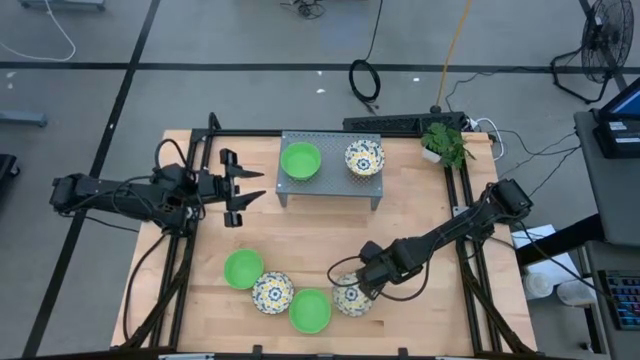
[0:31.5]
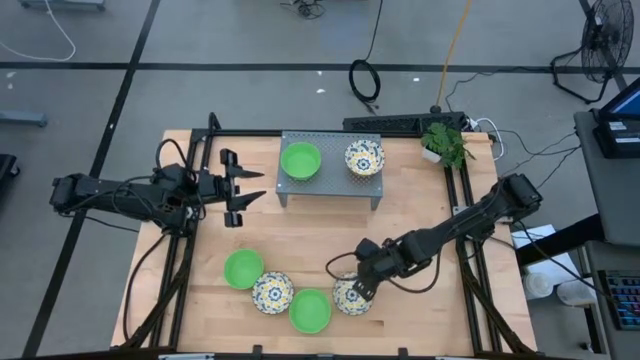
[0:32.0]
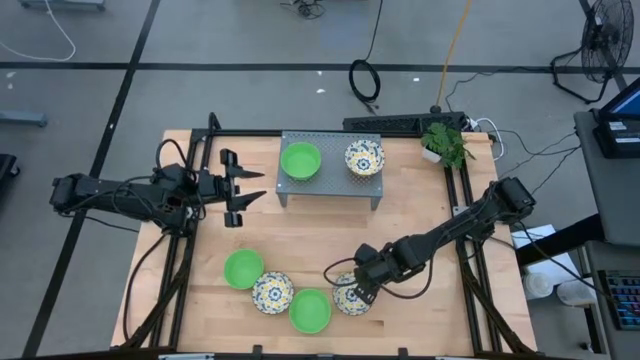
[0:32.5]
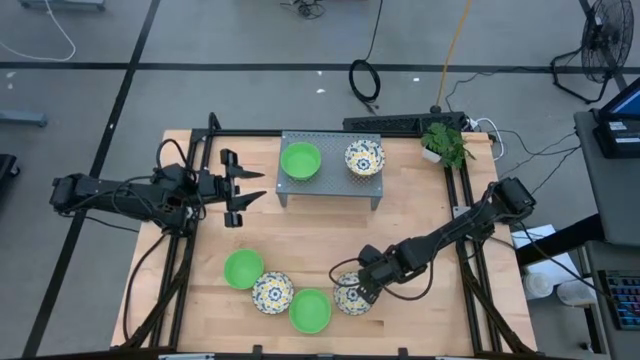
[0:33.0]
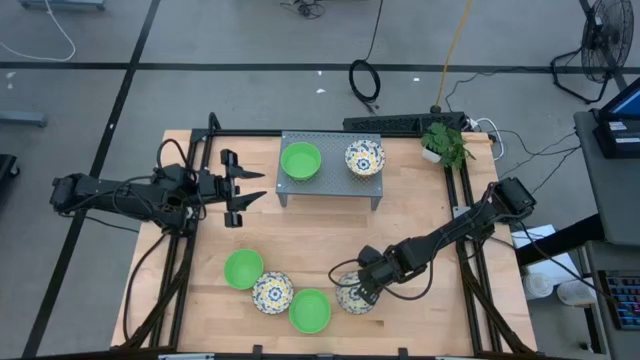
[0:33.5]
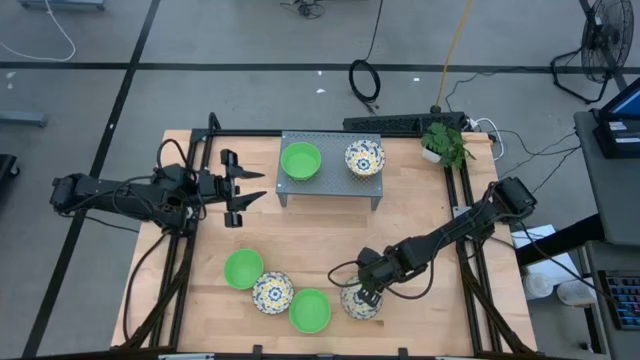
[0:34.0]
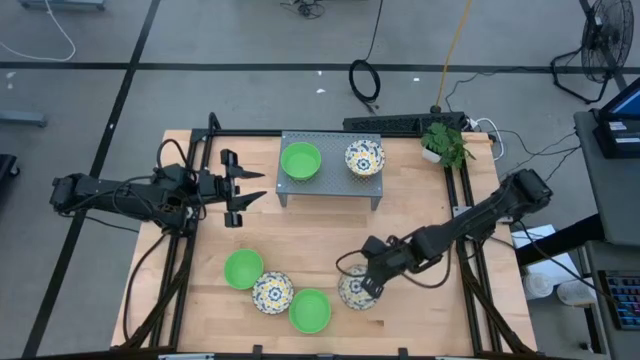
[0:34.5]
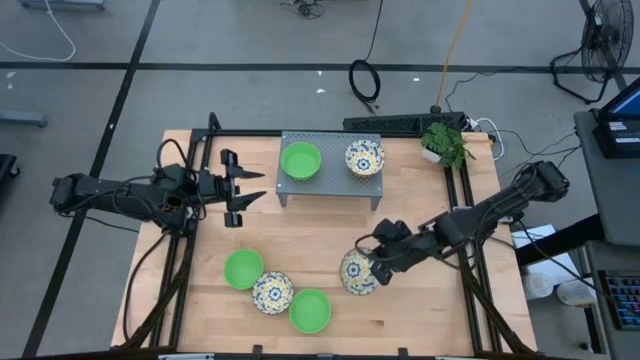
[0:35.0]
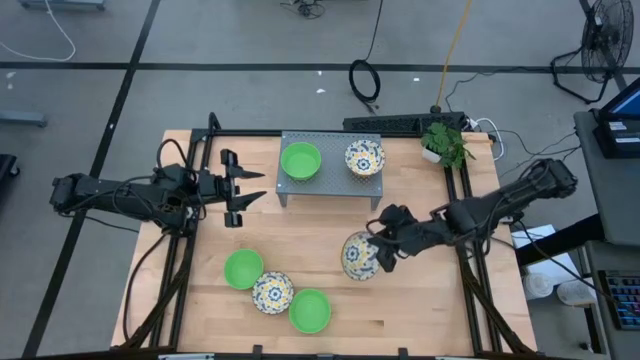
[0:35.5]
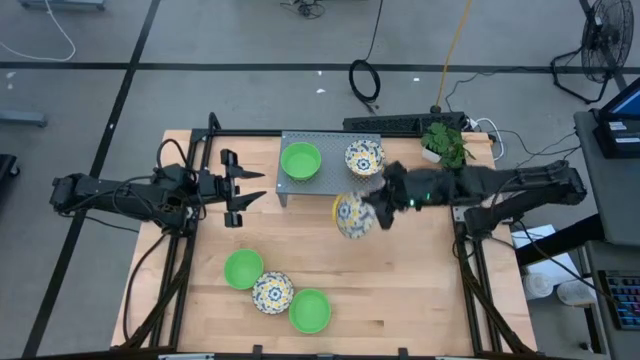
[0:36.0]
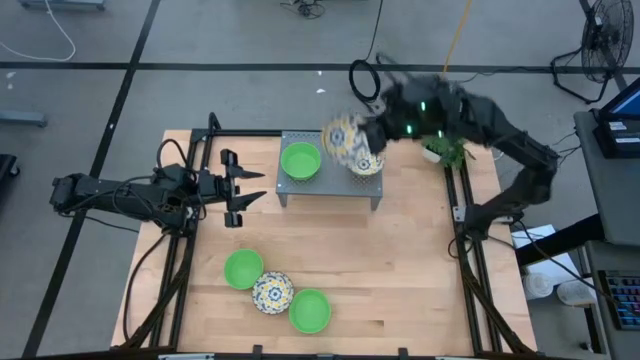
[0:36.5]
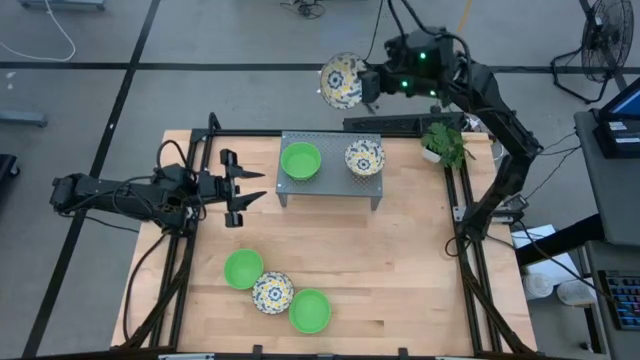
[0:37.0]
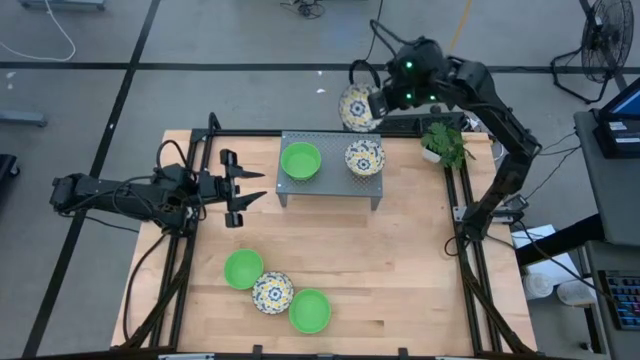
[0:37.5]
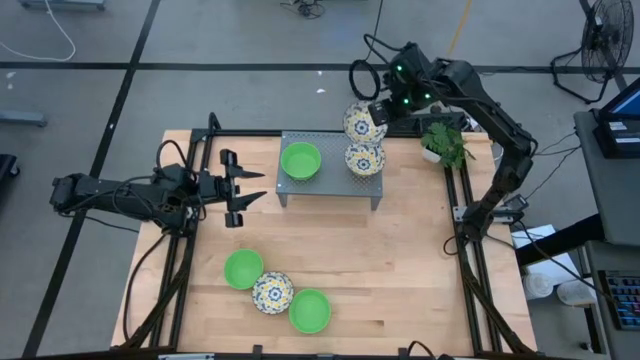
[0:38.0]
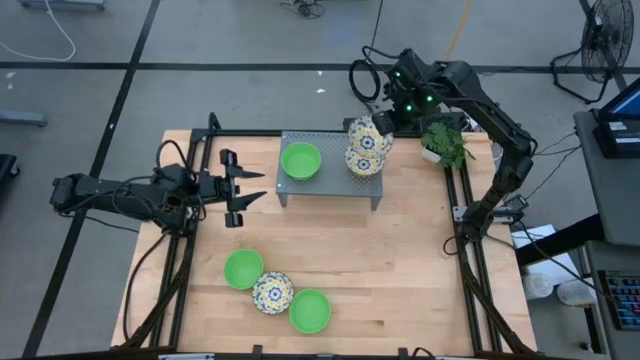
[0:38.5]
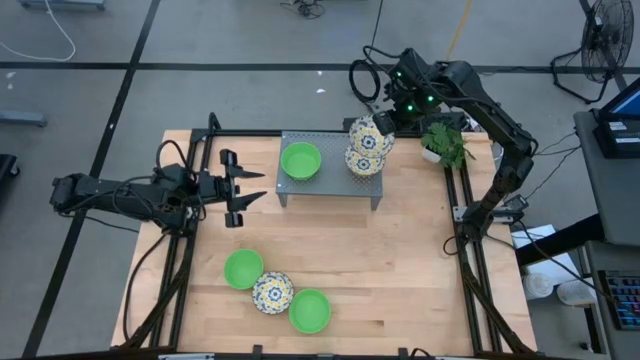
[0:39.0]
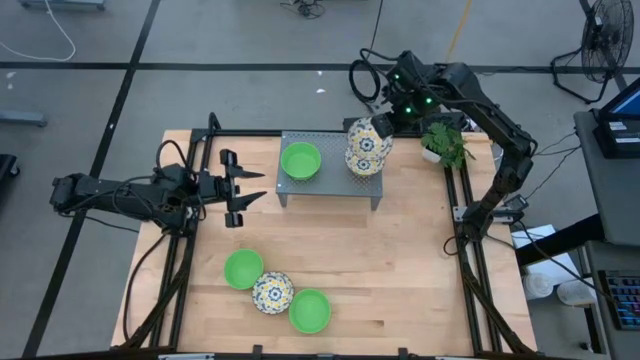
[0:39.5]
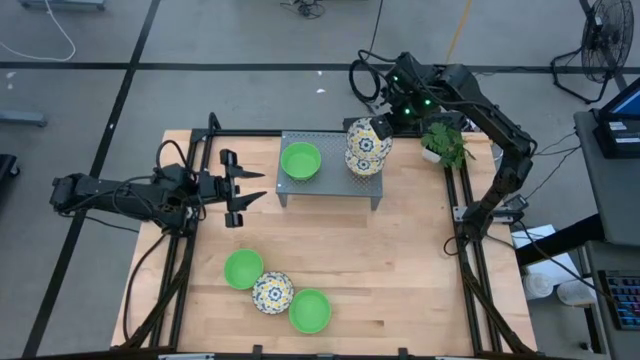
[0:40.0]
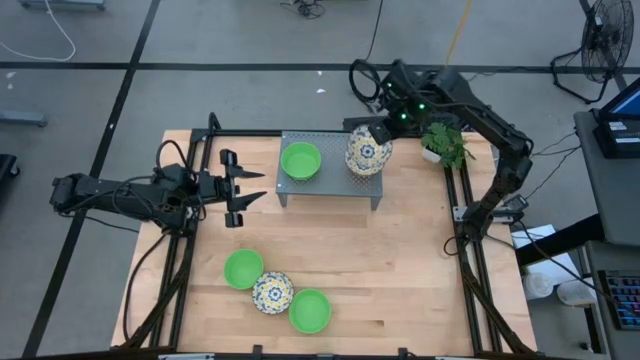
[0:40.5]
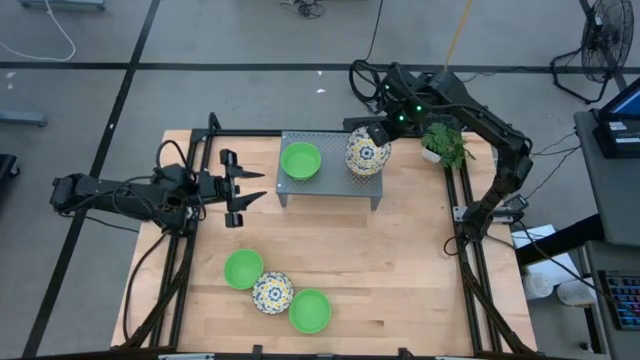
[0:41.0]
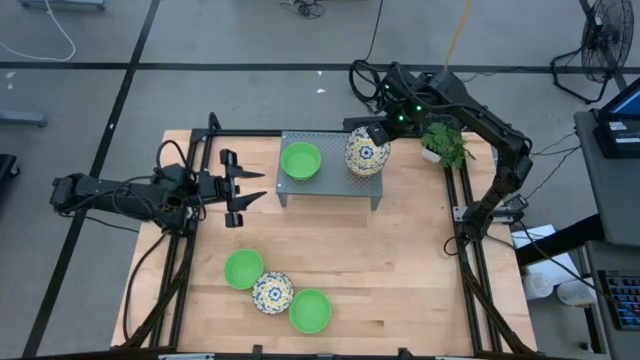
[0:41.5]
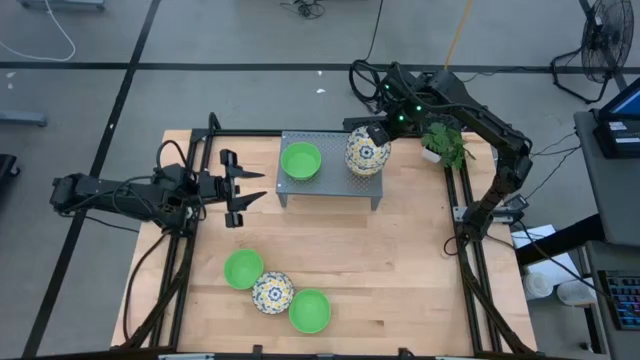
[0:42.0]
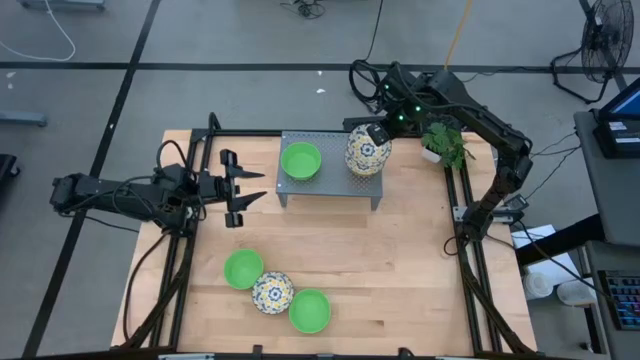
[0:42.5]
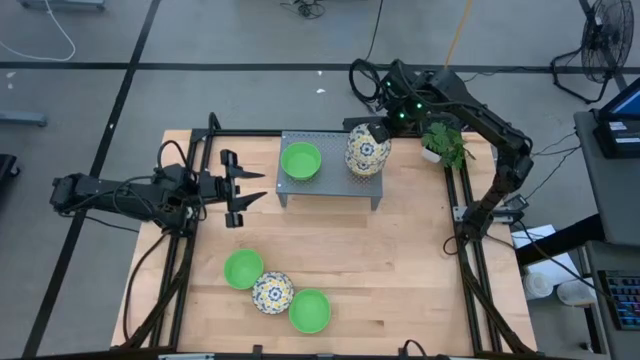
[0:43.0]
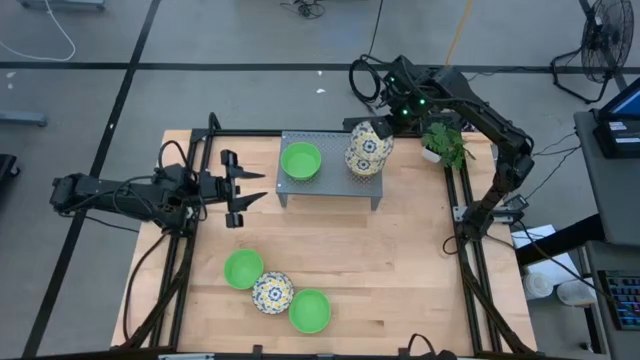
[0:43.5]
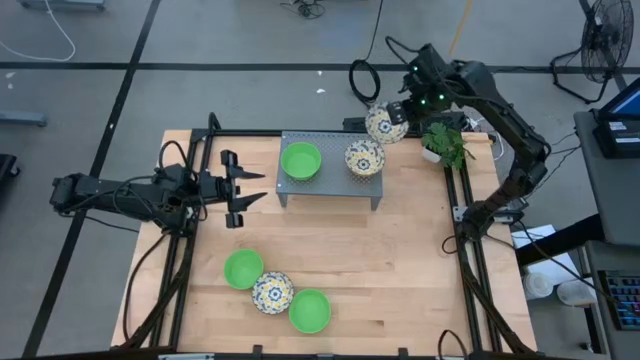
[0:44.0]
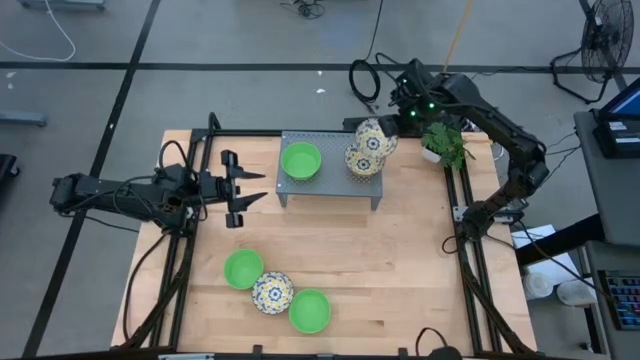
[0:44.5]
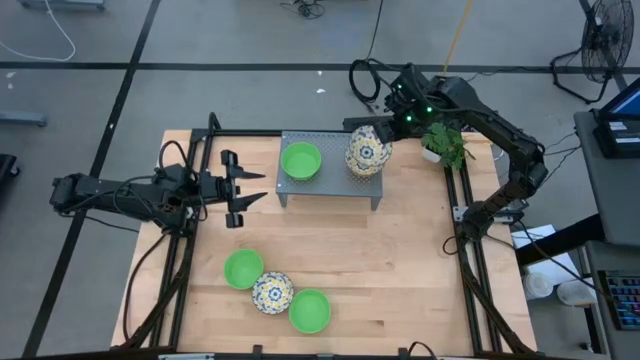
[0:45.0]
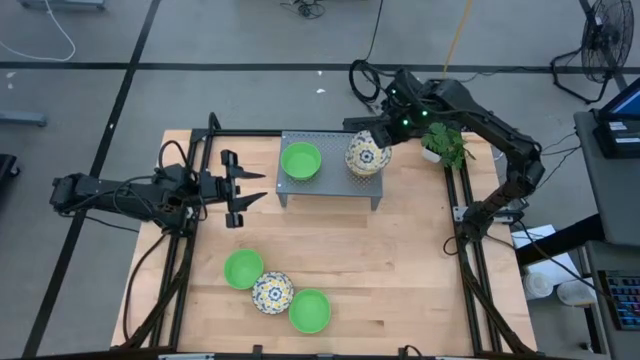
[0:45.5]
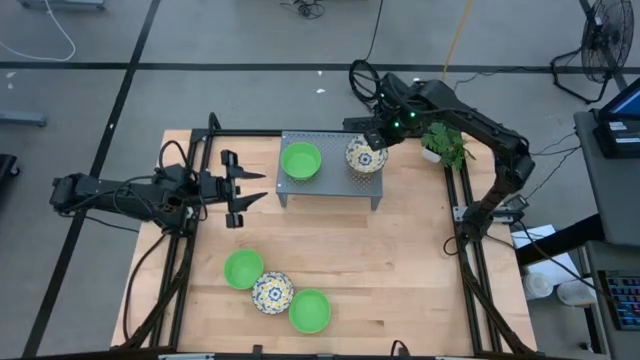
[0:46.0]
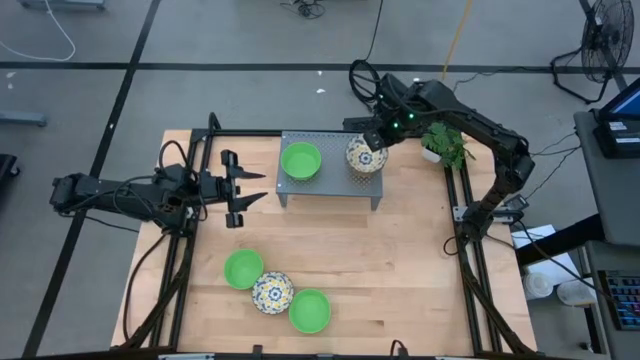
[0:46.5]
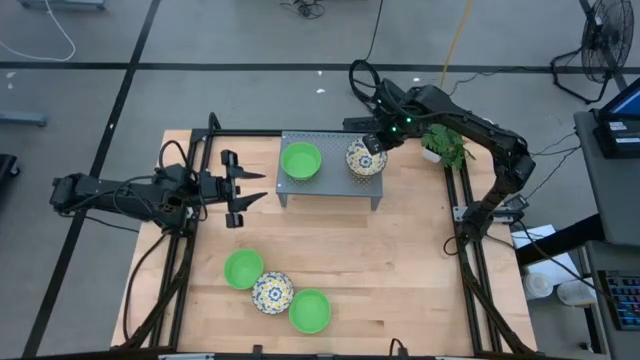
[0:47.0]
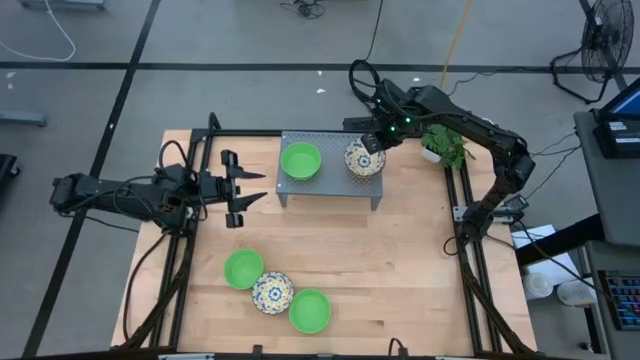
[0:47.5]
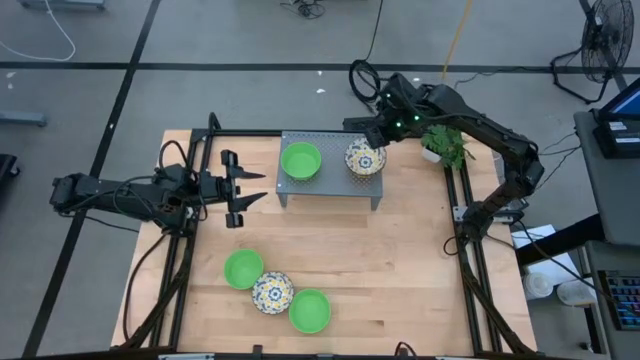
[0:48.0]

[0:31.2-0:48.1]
Task: Pick & Place Mini bowls
Stack the white patterned bowl on top of the white patterned bowl on the shelf

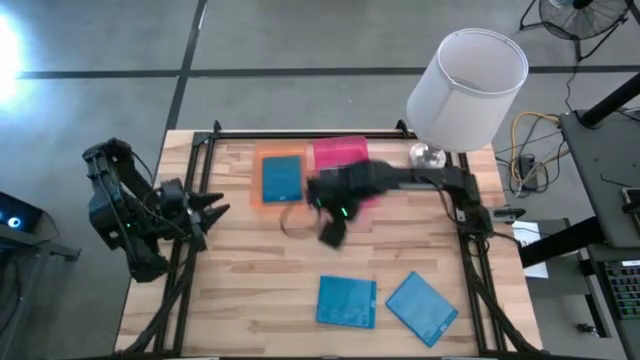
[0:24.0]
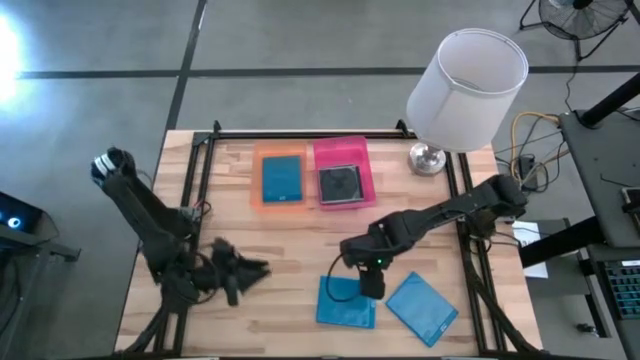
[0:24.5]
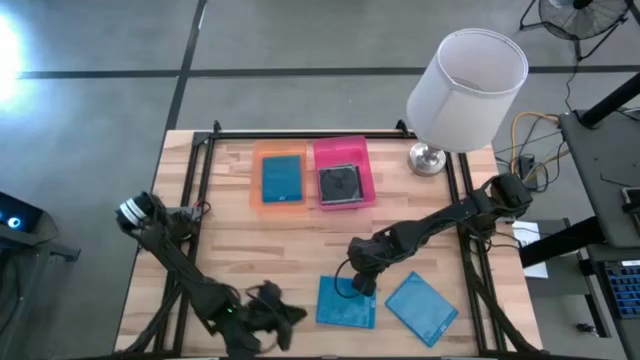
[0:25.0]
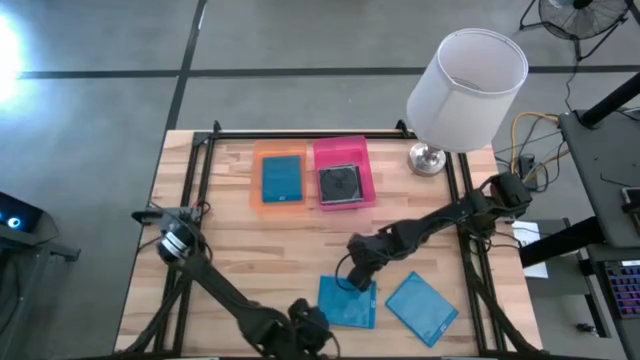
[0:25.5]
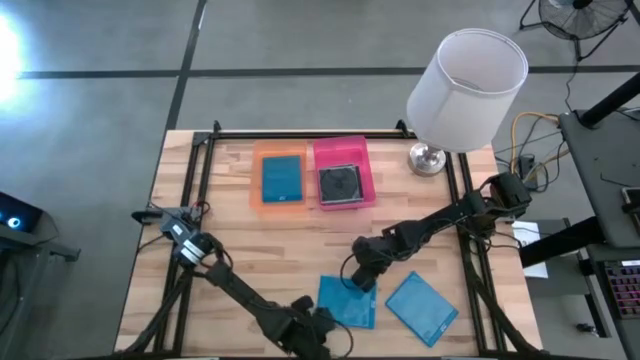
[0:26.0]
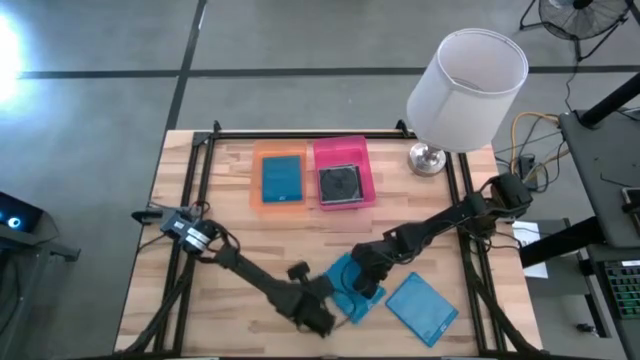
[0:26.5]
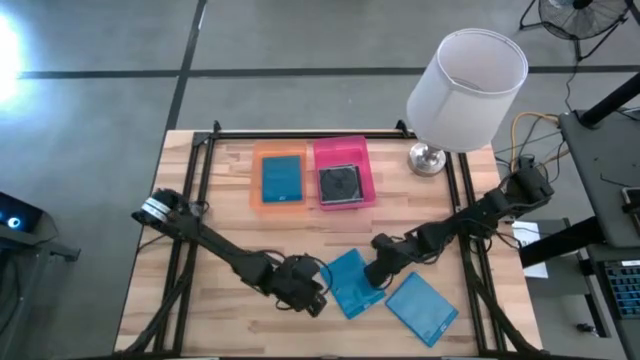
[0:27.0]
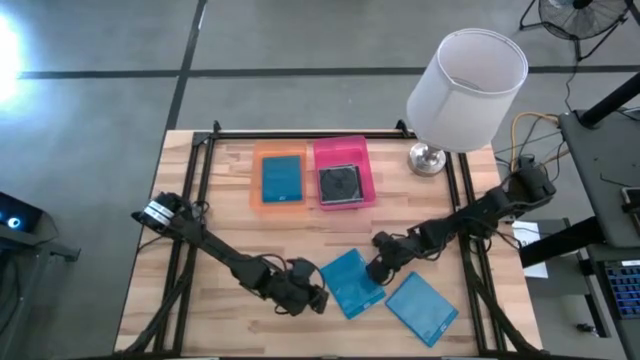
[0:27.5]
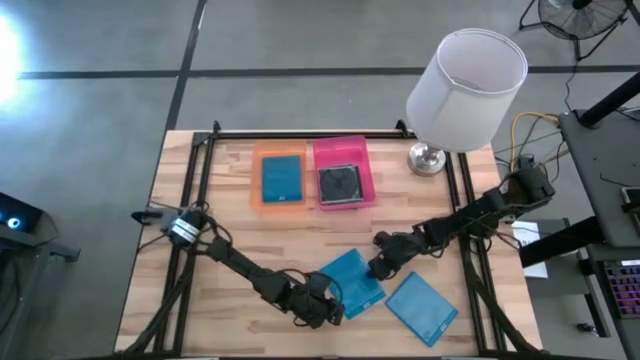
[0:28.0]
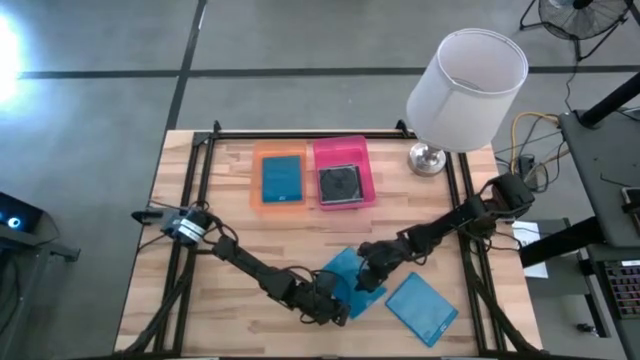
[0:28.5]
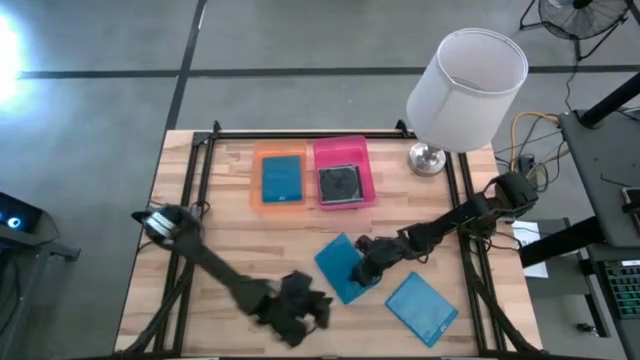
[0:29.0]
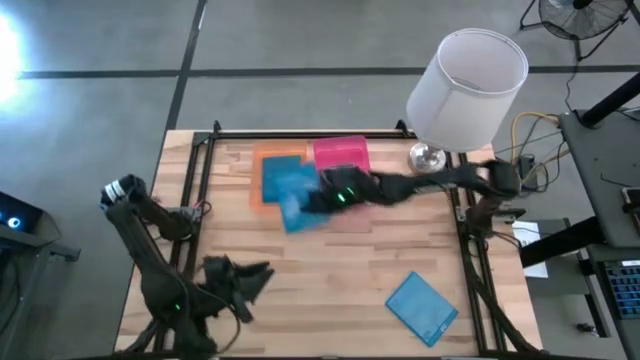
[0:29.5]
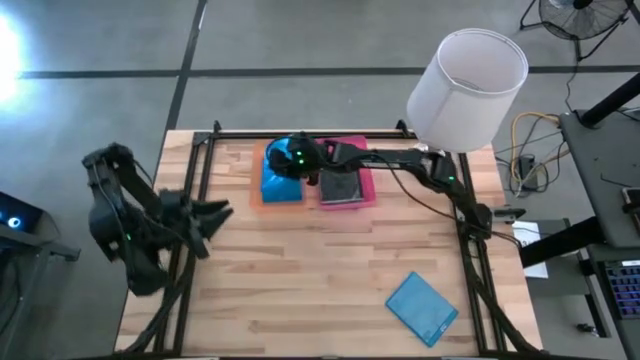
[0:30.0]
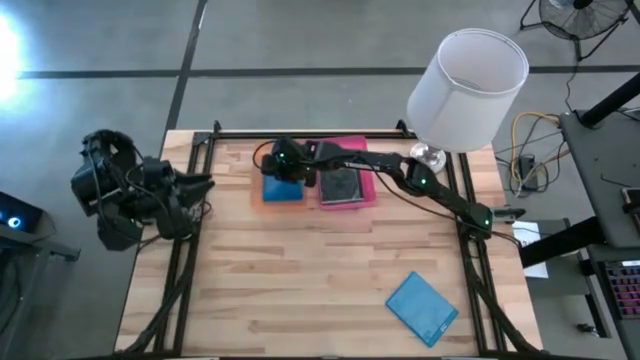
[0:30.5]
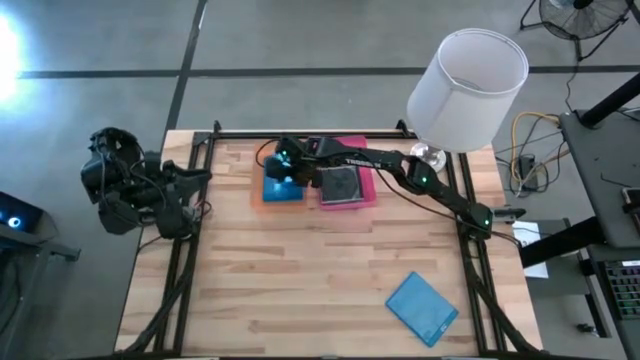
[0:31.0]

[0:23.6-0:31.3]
Task: Pick & place jewel cases by type
Put the left blue CD case into the orange bin
